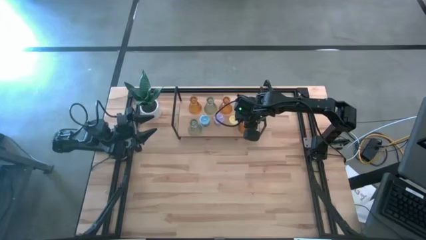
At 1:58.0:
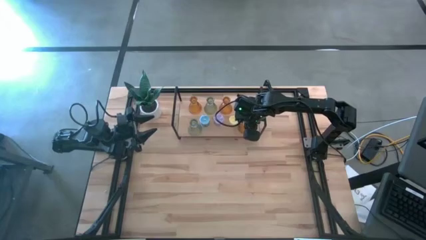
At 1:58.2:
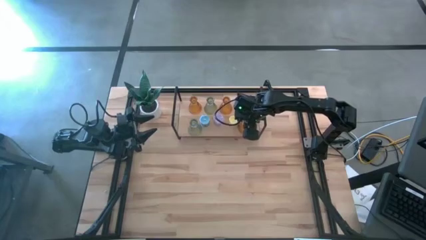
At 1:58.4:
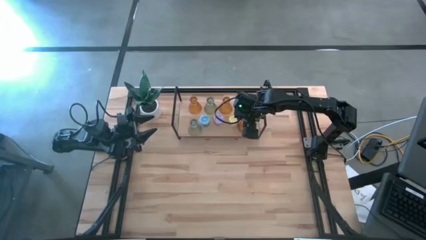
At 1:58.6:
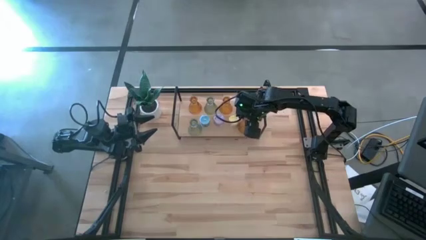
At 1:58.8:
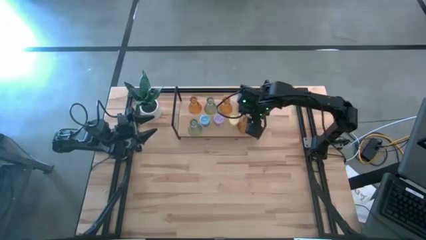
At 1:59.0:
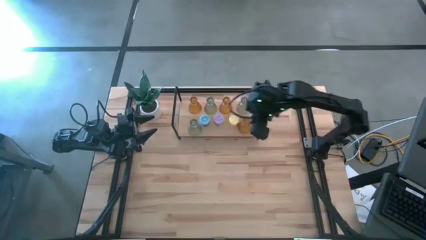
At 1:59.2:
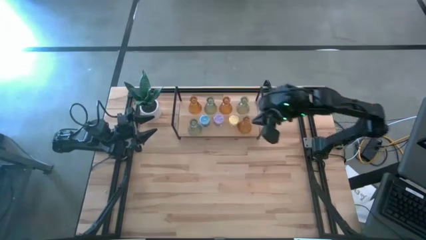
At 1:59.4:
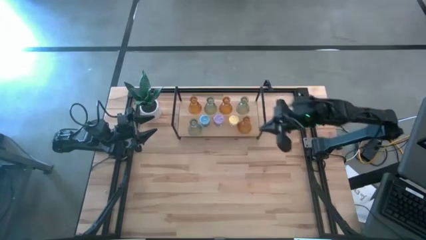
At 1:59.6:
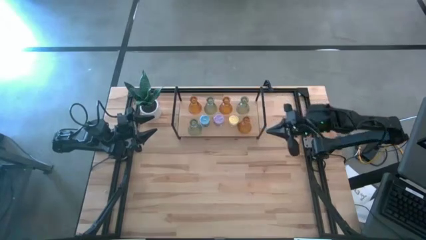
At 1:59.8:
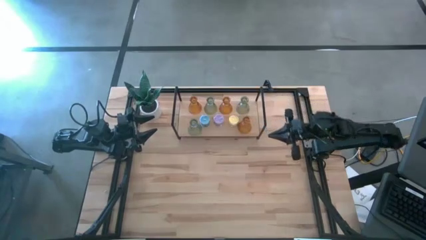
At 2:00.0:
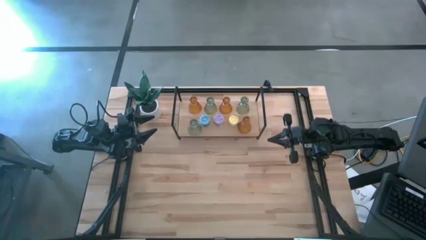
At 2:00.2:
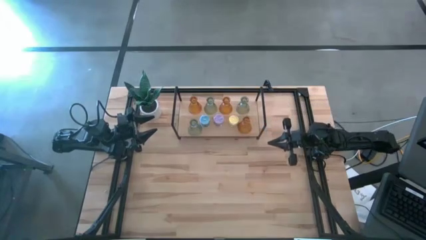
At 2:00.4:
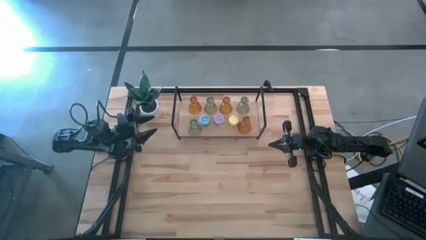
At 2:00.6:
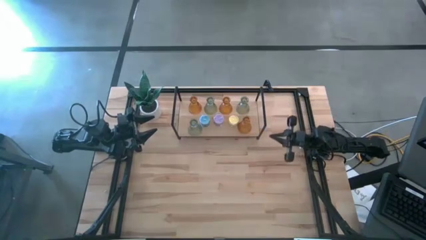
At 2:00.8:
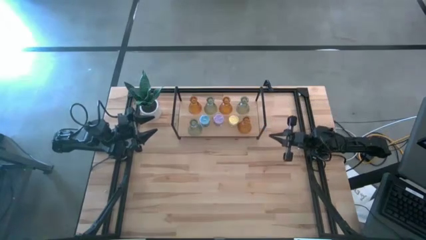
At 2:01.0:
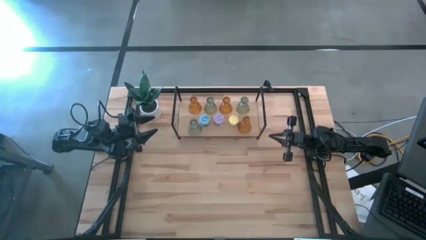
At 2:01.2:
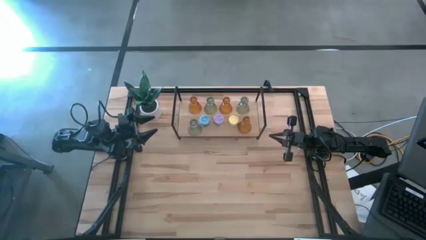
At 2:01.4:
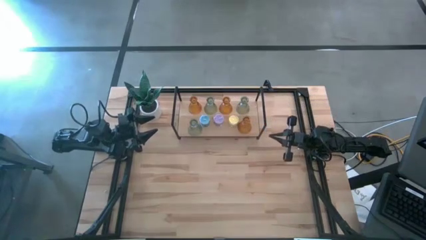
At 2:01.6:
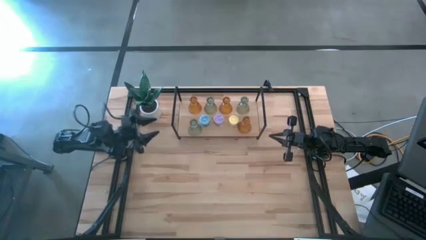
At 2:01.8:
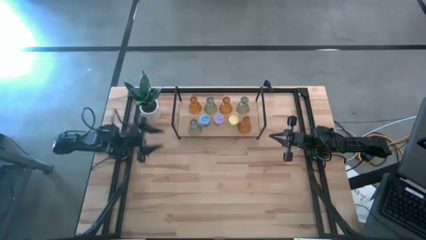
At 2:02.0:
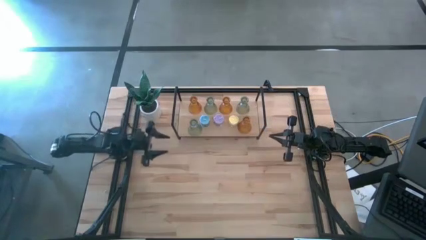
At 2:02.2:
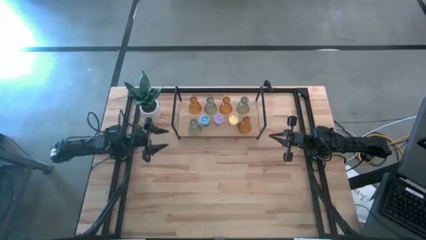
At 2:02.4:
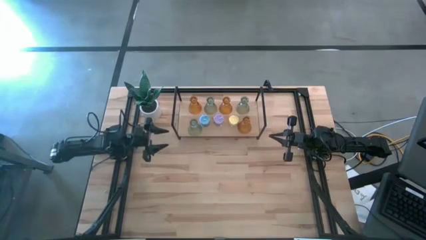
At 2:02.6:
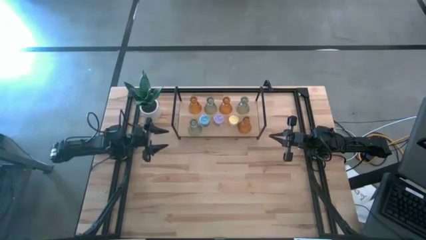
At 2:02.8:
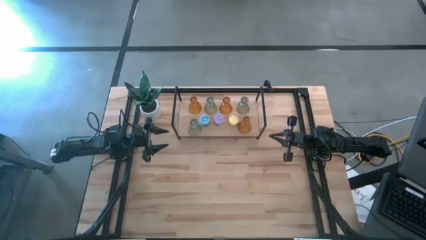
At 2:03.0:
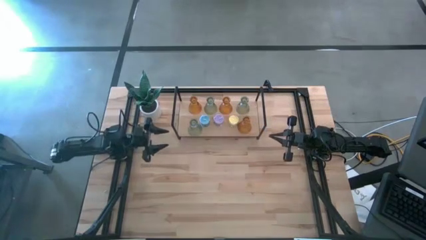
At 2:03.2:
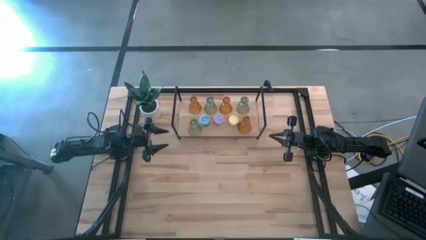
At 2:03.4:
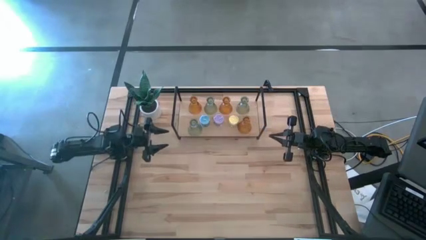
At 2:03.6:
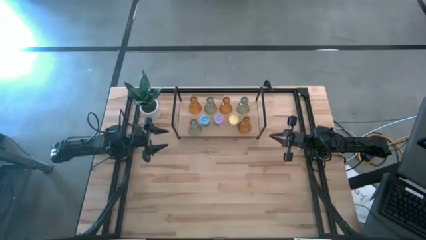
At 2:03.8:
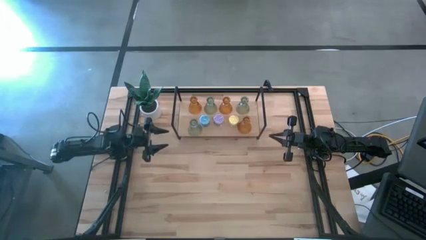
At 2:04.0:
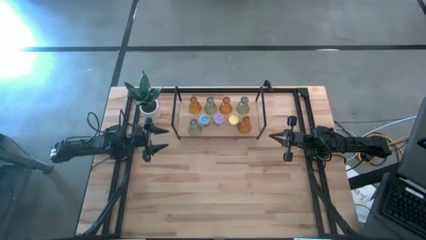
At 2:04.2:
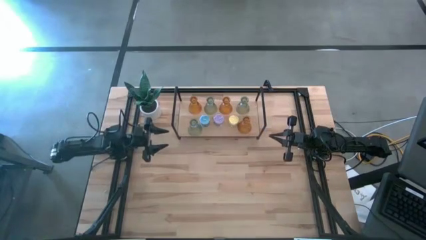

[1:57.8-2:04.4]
Task: Pick & Place candle stick holders
Return to Home Position

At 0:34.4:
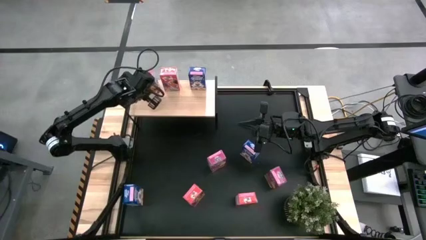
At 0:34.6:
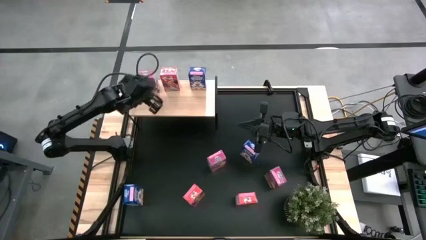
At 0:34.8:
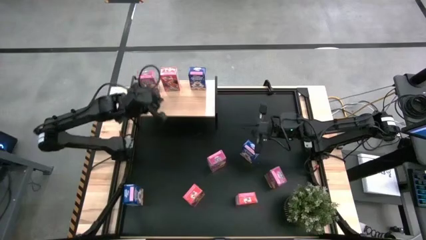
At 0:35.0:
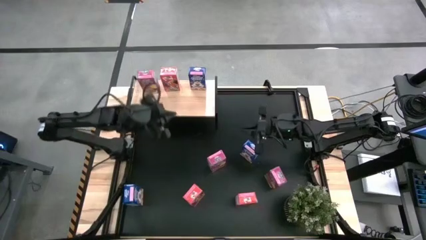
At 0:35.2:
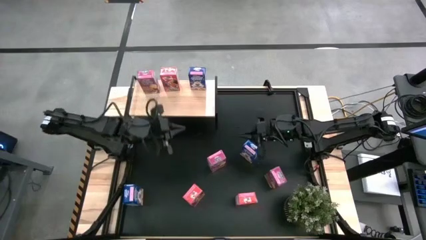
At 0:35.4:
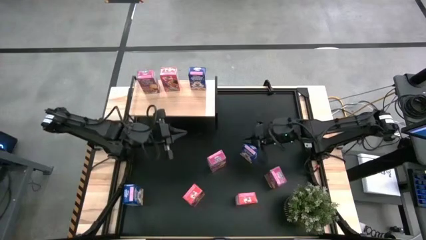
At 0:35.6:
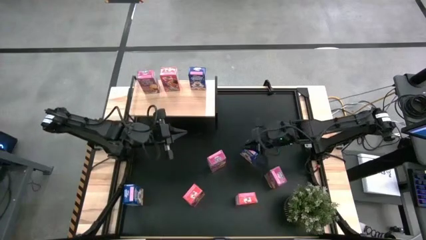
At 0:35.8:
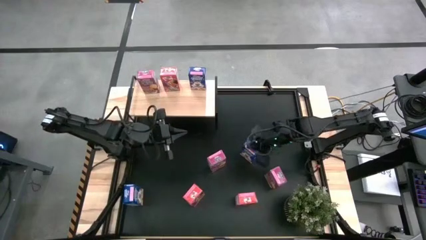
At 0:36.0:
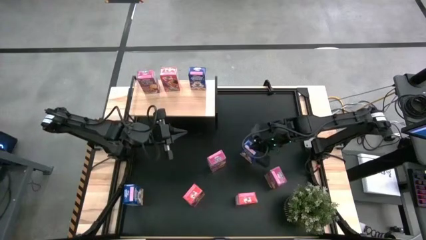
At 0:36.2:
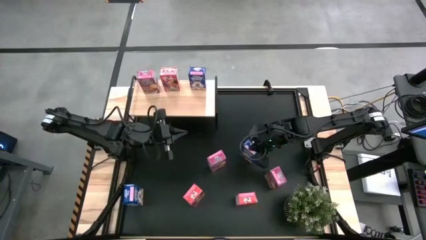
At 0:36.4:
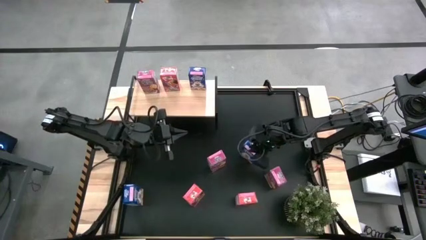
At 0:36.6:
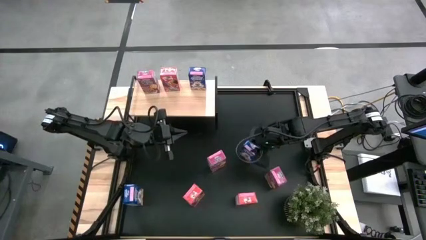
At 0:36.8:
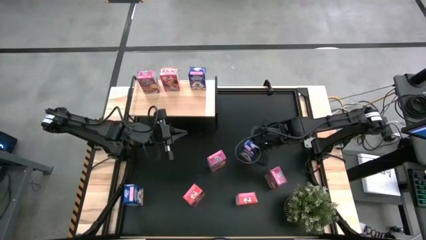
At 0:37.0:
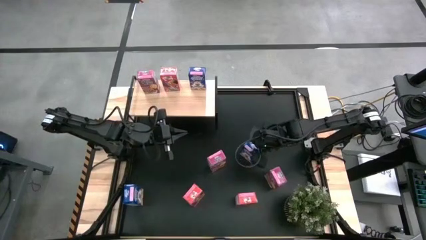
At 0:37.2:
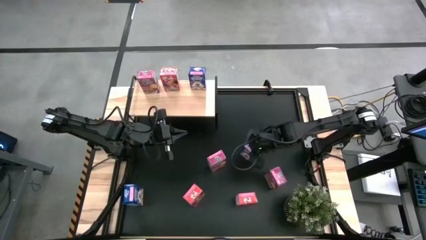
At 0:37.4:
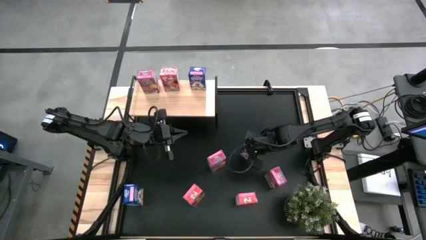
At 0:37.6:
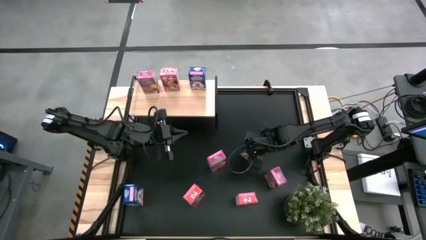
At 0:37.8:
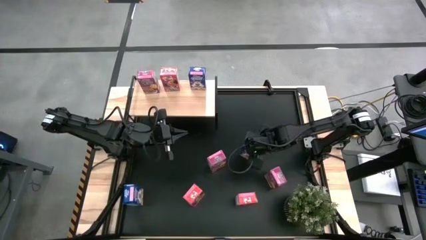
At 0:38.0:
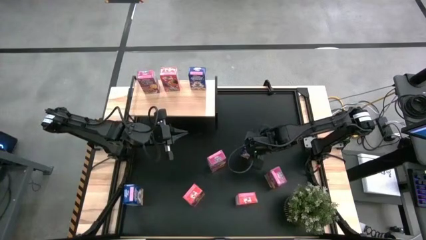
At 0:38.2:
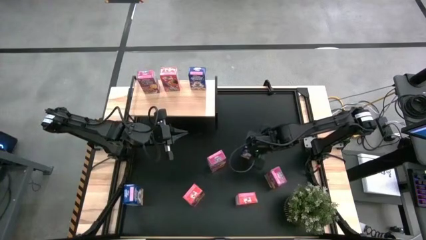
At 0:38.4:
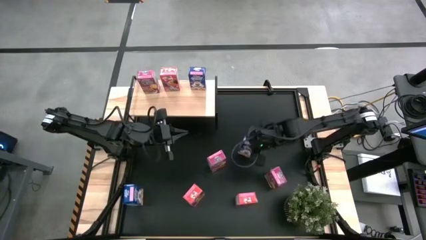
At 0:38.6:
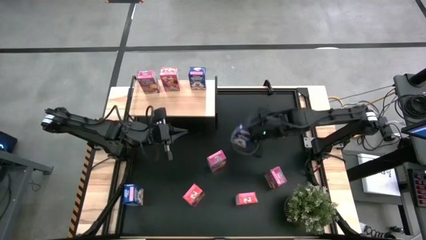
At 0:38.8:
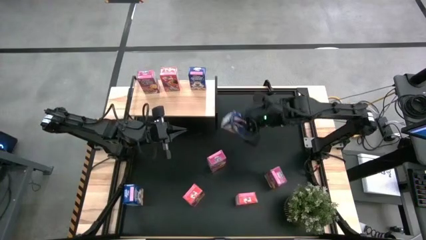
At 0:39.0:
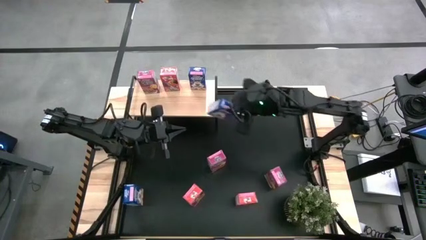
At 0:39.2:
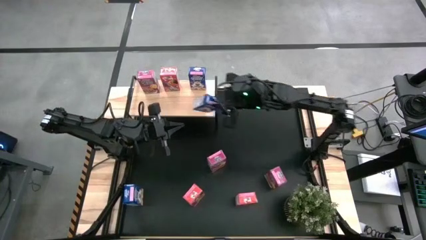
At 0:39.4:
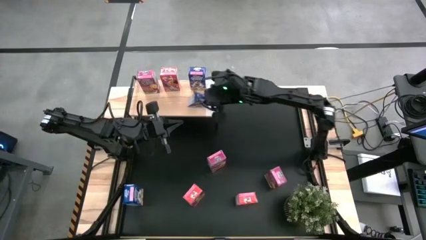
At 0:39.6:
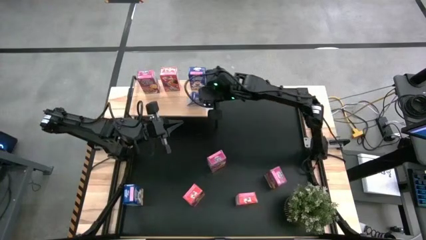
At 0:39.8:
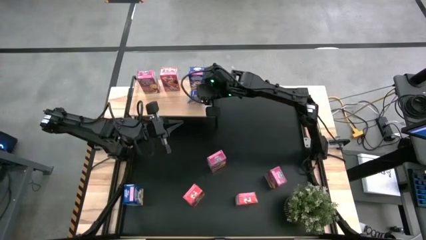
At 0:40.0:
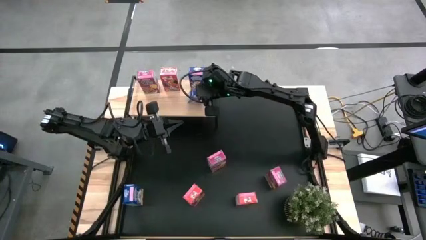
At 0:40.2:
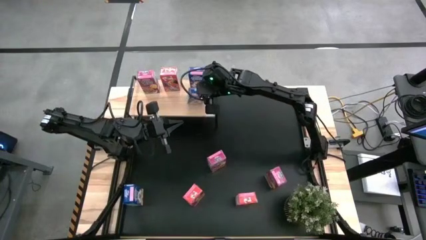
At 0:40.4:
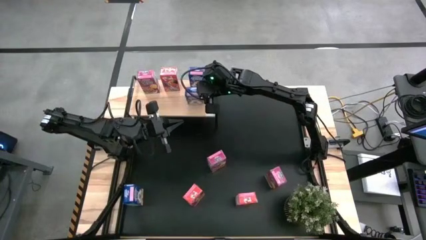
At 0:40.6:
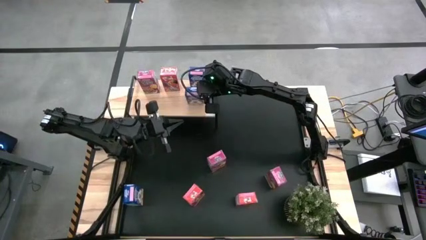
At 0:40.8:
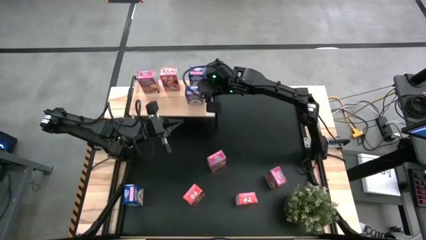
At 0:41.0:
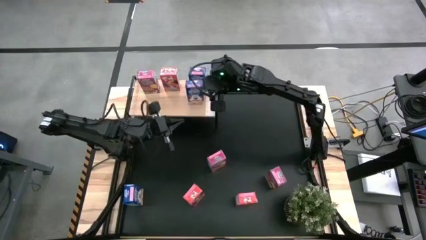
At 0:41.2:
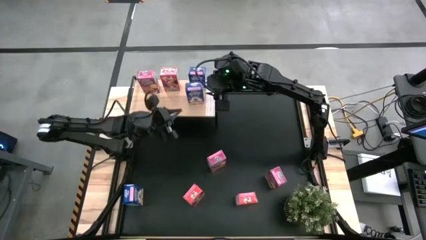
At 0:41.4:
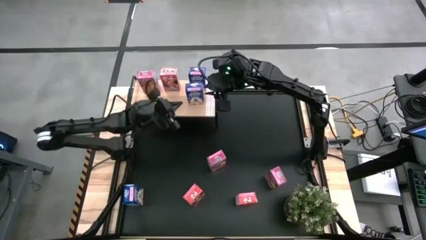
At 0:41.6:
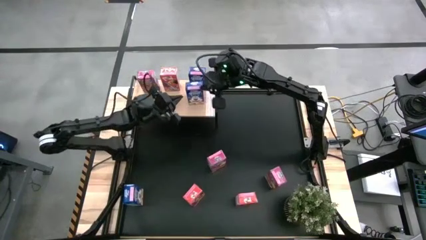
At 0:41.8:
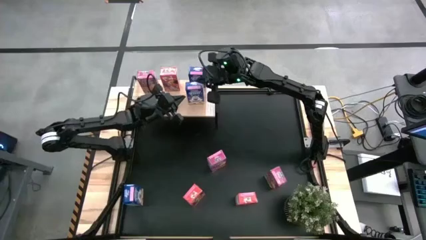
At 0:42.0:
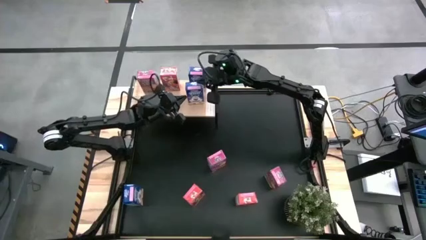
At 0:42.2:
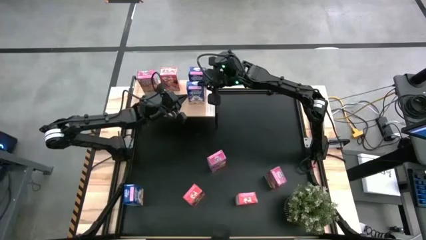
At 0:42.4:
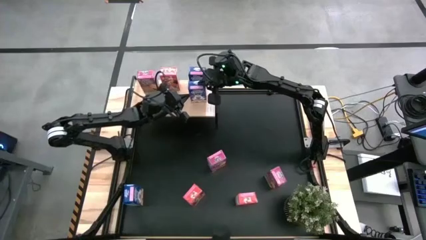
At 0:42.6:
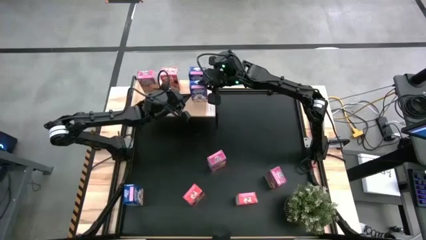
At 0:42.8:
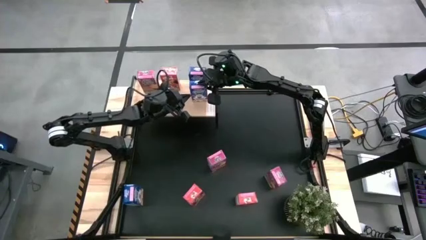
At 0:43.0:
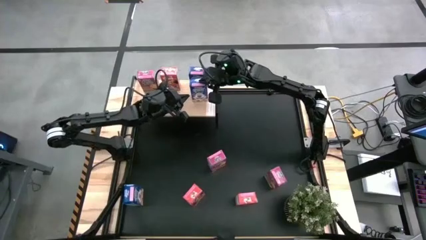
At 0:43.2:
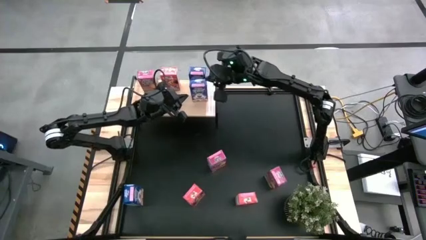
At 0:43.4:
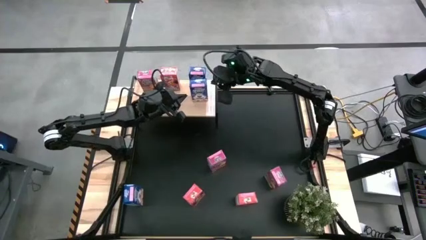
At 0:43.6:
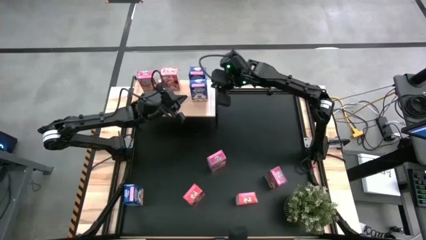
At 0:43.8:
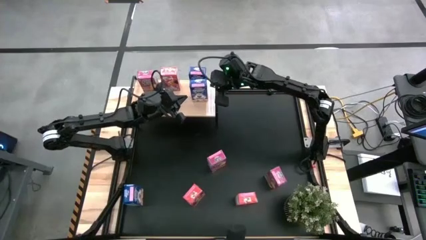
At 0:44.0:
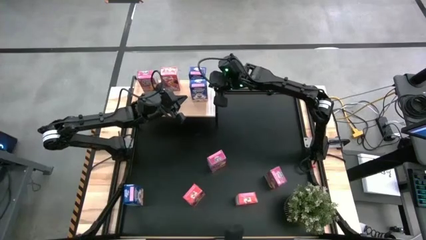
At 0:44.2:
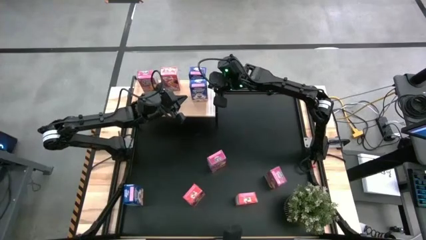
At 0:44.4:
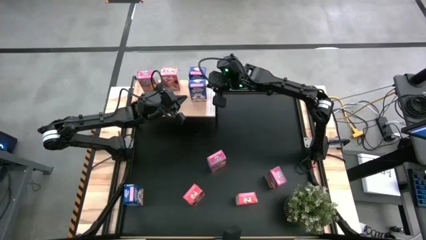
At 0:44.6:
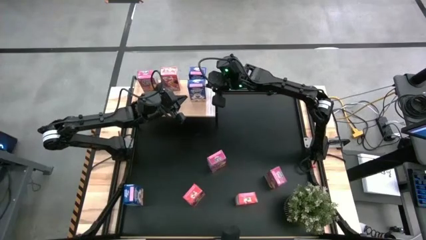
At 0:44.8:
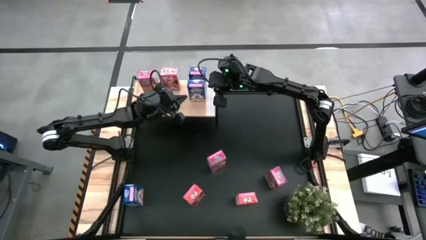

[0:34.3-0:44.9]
Task: Stack cereal on shelf
Align the right blue cereal box with the other blue cereal box on the shelf
